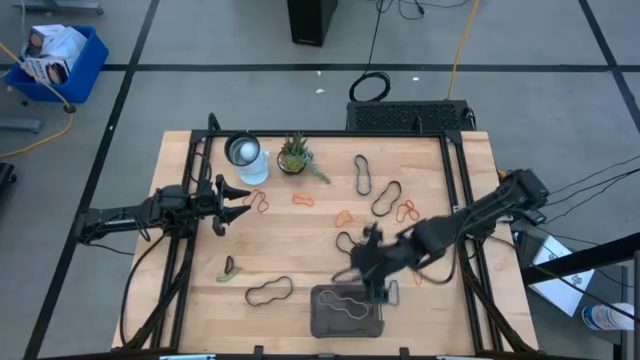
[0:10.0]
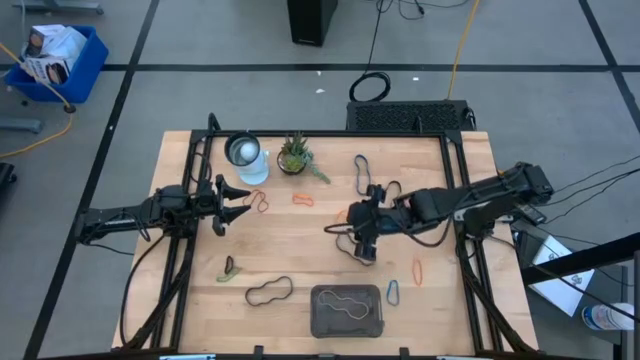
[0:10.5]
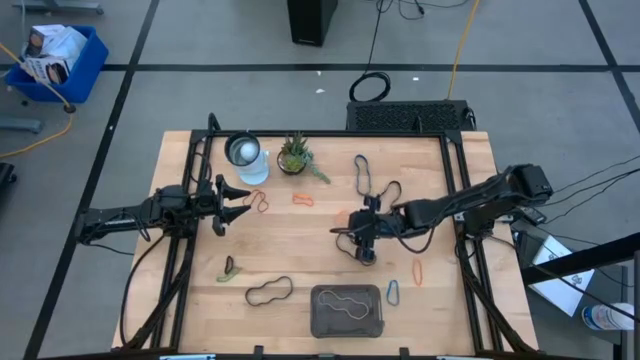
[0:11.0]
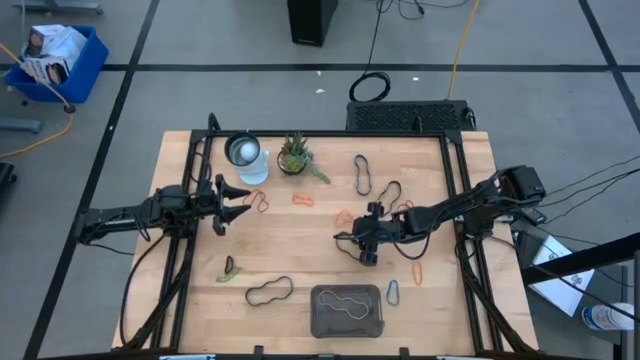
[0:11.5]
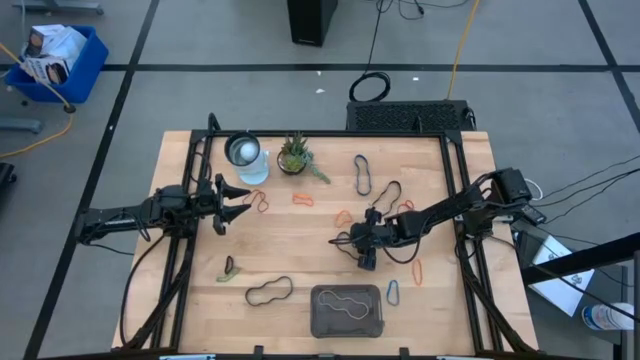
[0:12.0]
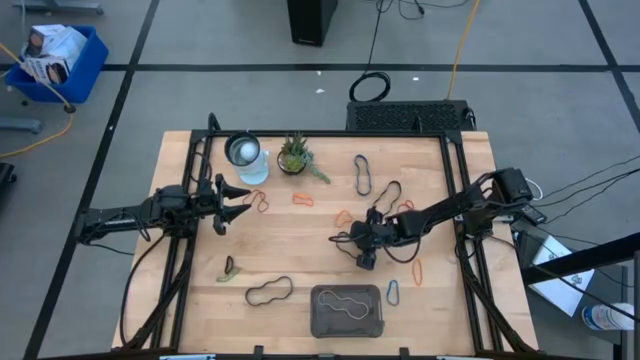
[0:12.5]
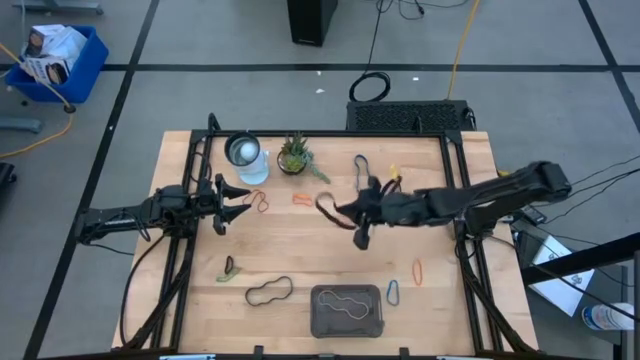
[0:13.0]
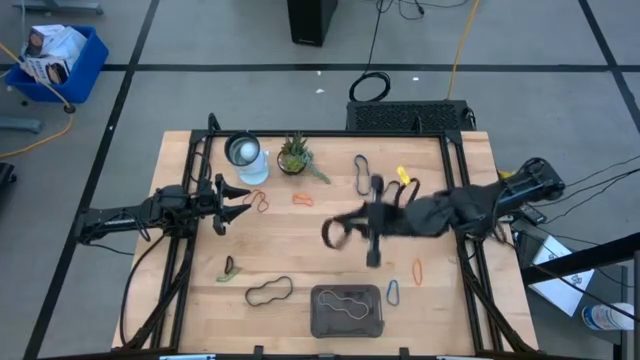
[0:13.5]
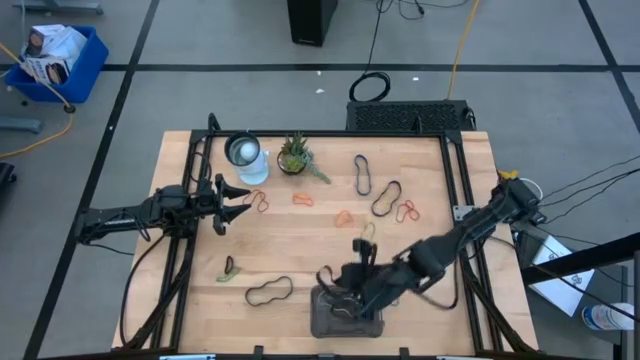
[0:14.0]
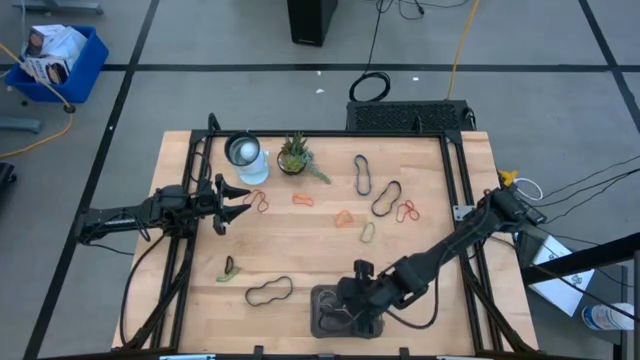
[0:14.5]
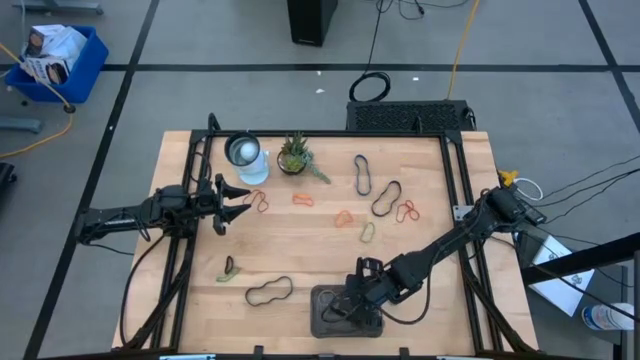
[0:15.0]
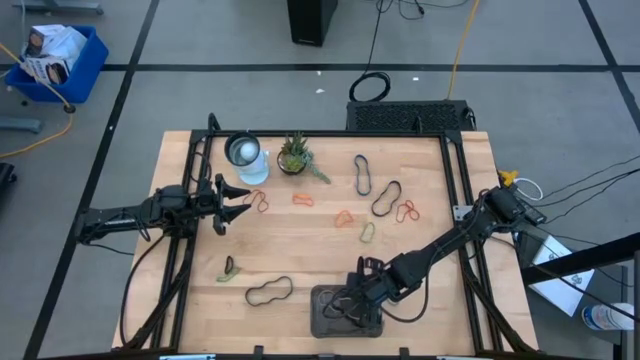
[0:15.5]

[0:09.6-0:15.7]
Task: Pick and place rubber bands into bin
Put the black rubber band into the black transparent bin

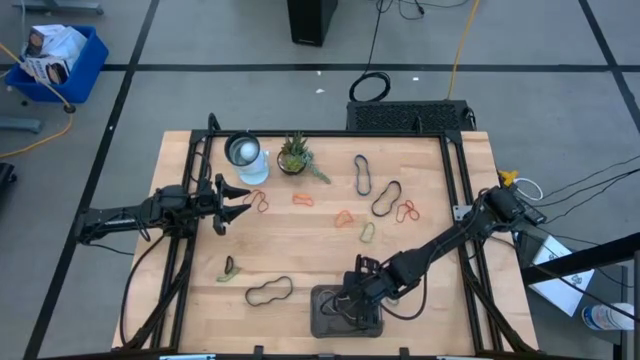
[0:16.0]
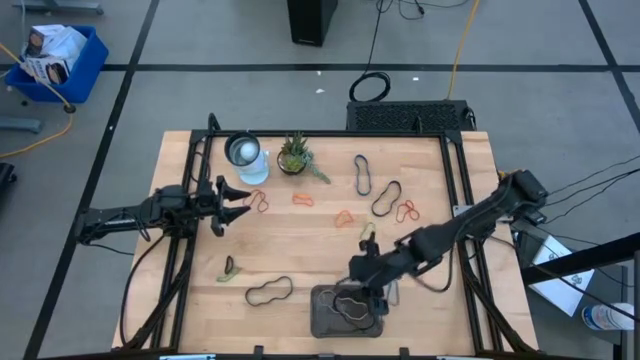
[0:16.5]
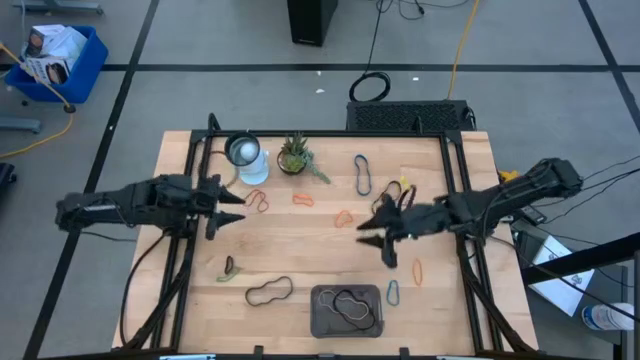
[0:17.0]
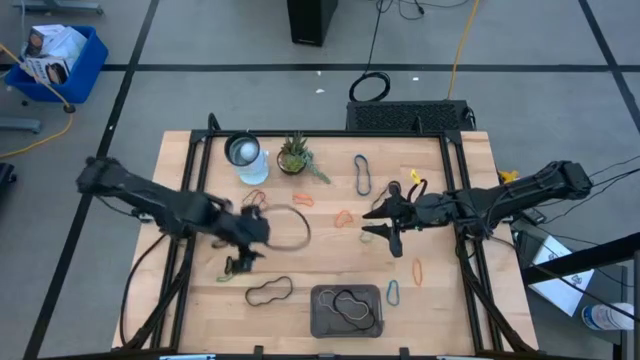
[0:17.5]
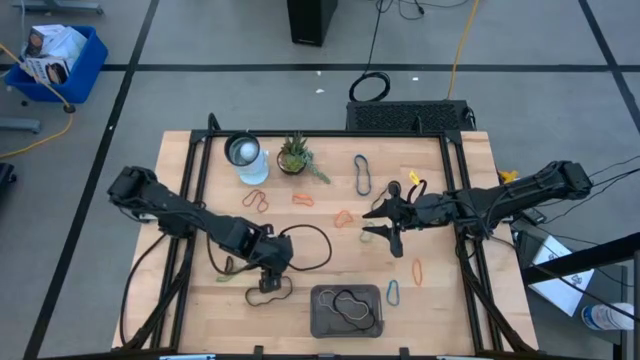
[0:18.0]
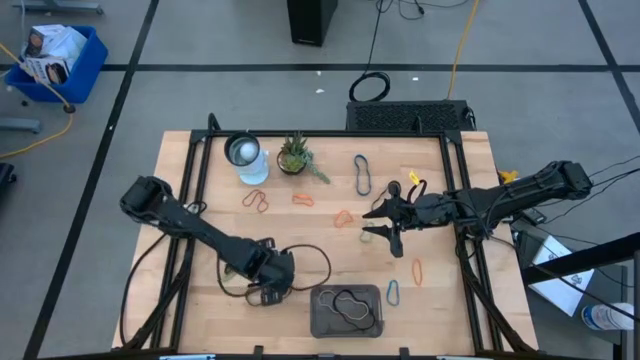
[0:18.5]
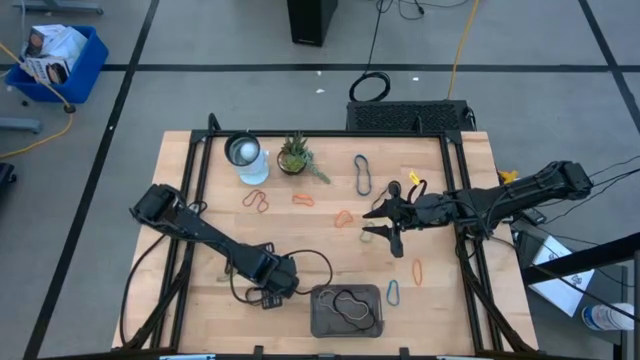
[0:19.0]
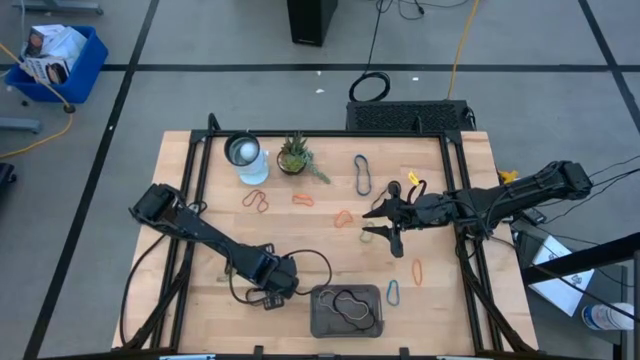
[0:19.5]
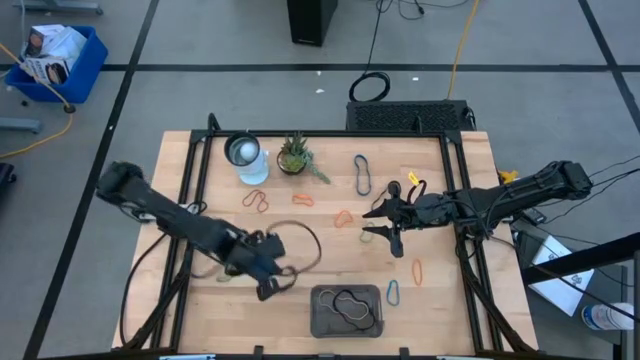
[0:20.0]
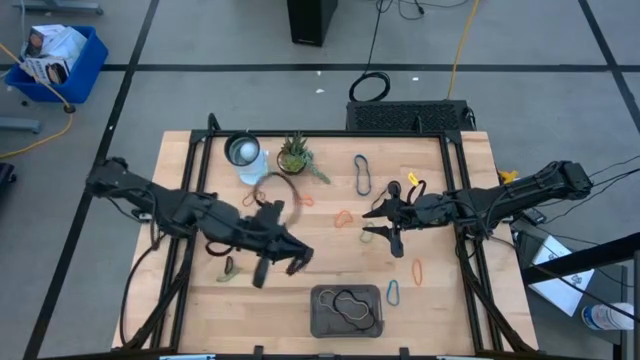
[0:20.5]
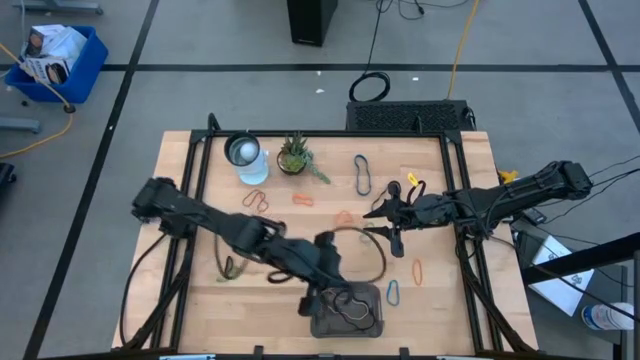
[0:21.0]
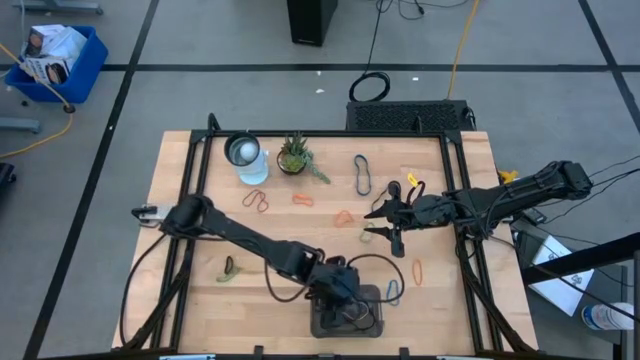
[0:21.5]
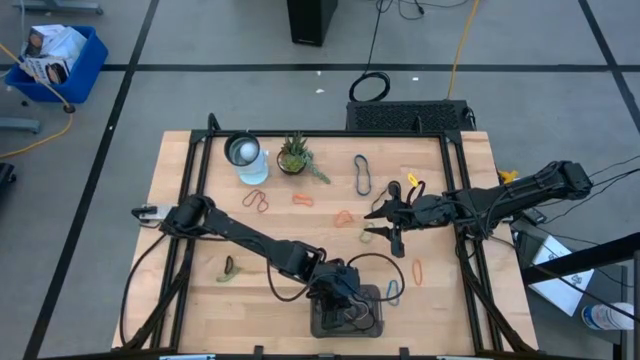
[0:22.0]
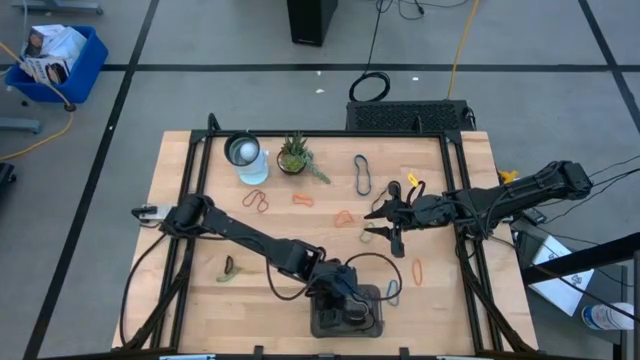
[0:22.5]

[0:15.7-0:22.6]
Put the black rubber band into the black transparent bin

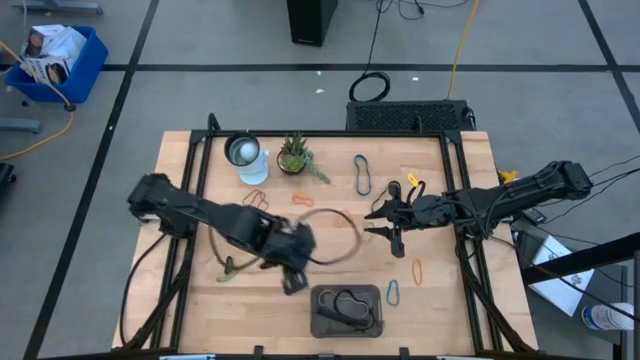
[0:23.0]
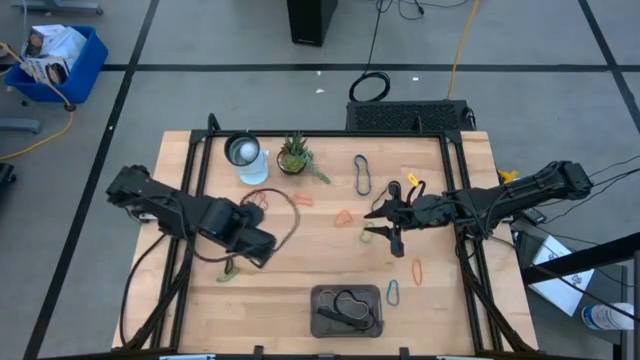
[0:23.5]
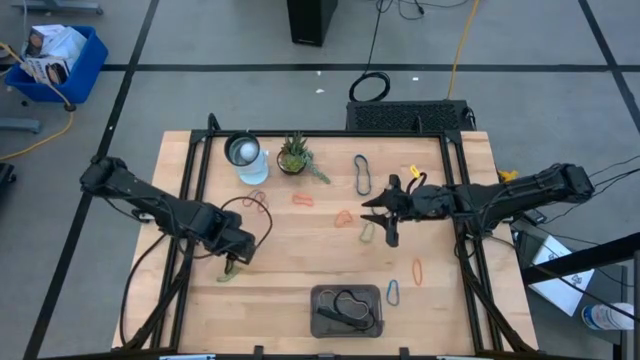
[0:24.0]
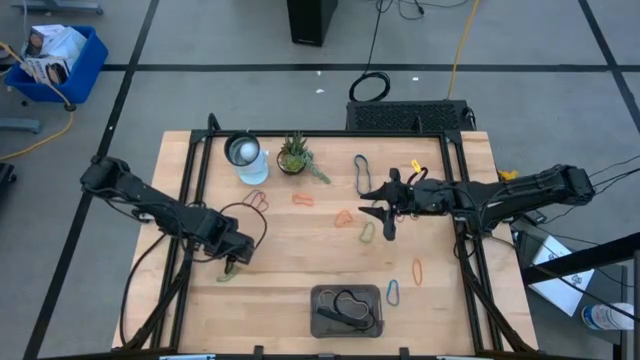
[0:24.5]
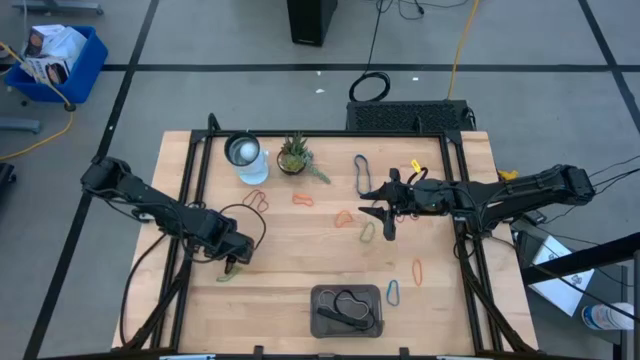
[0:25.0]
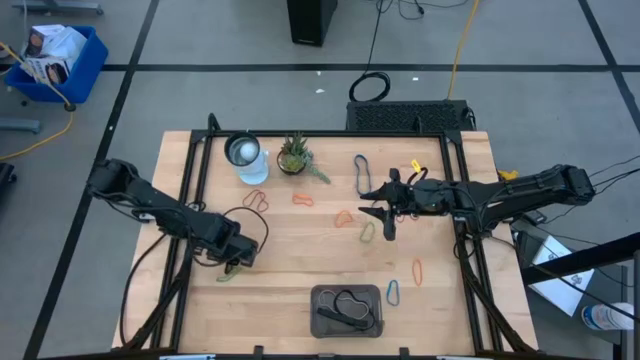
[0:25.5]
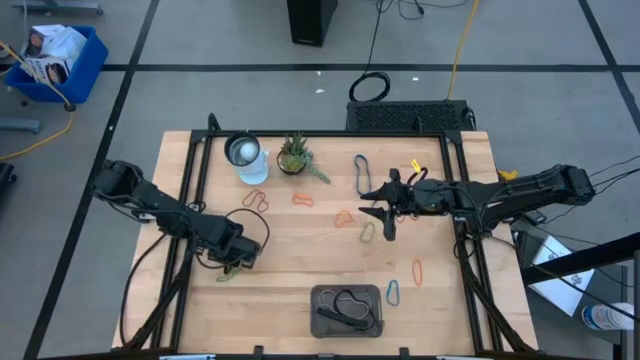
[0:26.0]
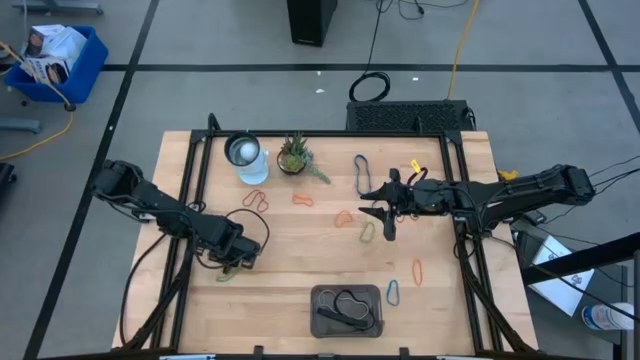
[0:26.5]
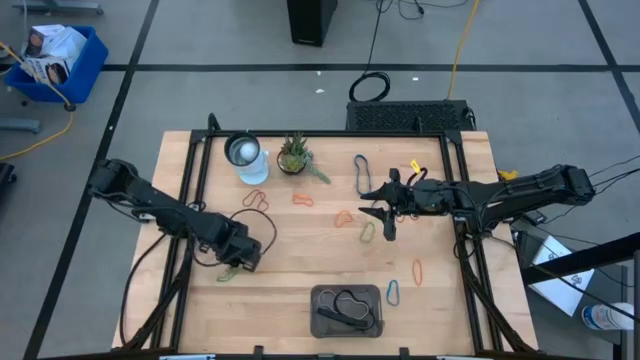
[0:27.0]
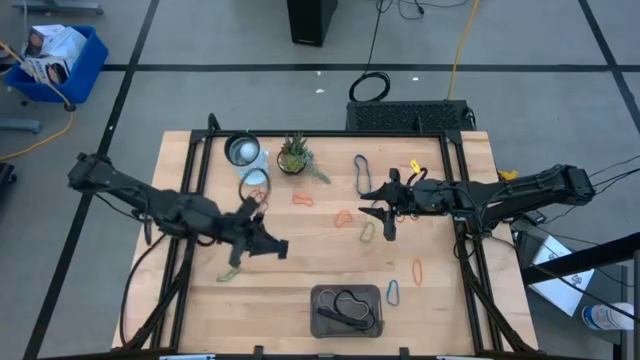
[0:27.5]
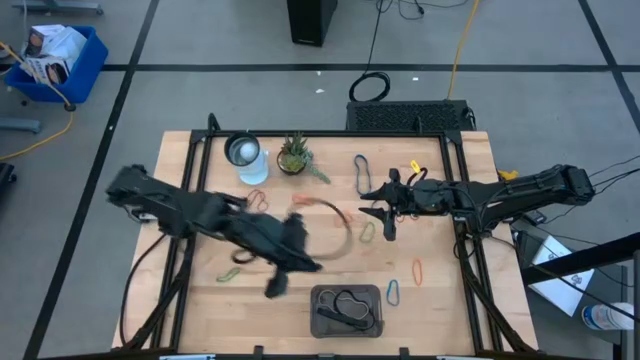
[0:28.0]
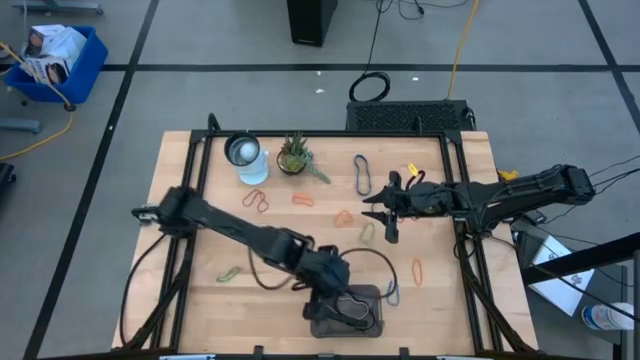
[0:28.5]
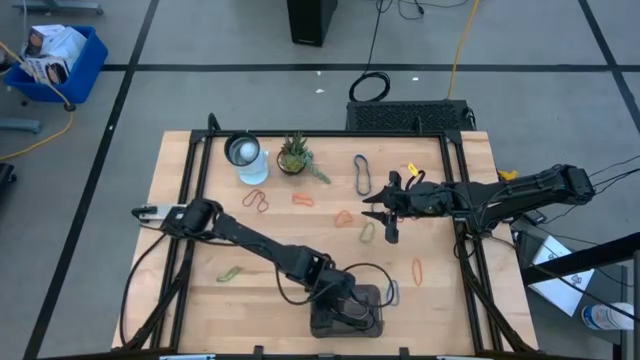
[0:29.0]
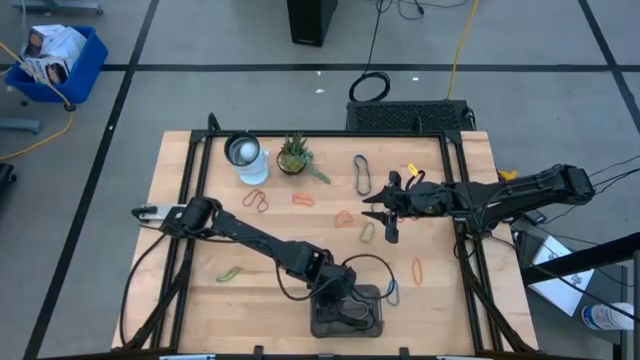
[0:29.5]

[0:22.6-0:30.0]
Put the black rubber band into the black transparent bin

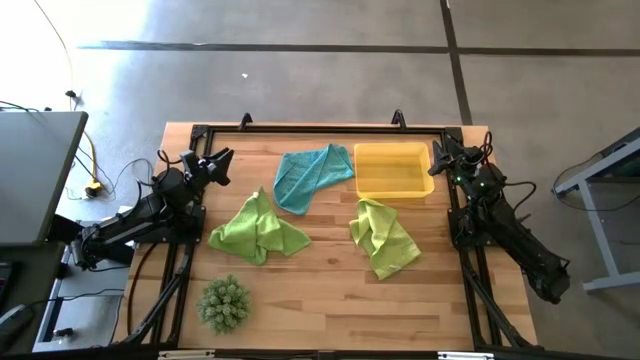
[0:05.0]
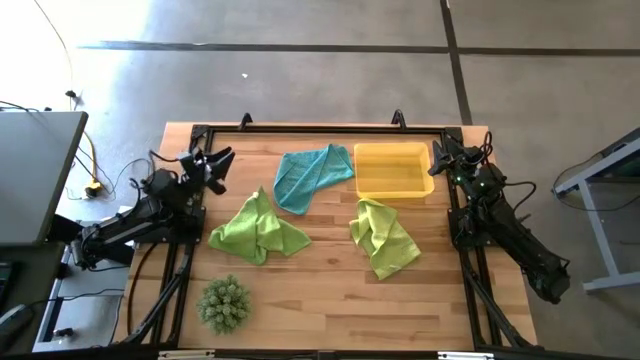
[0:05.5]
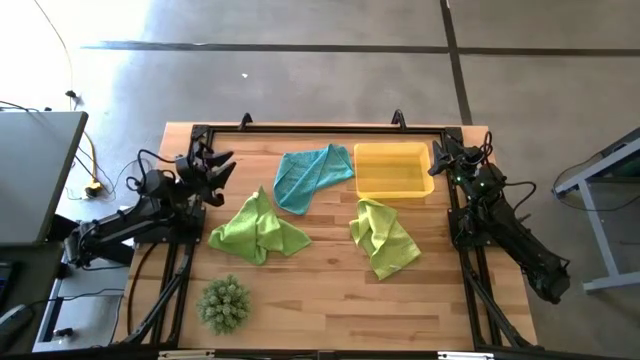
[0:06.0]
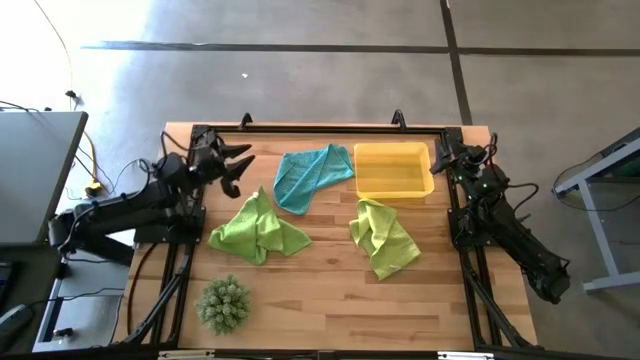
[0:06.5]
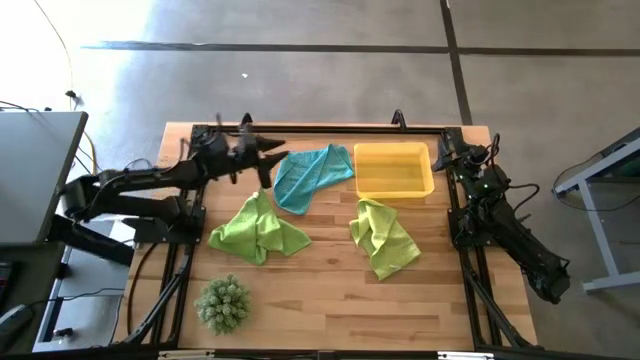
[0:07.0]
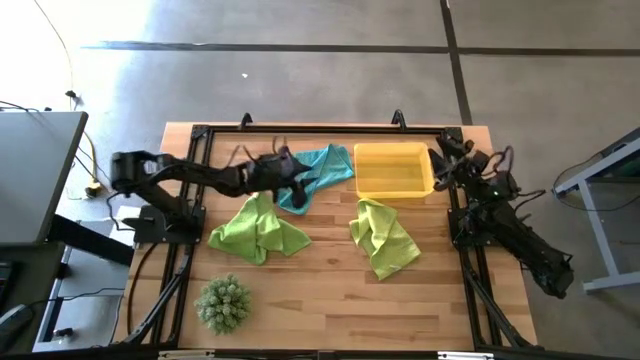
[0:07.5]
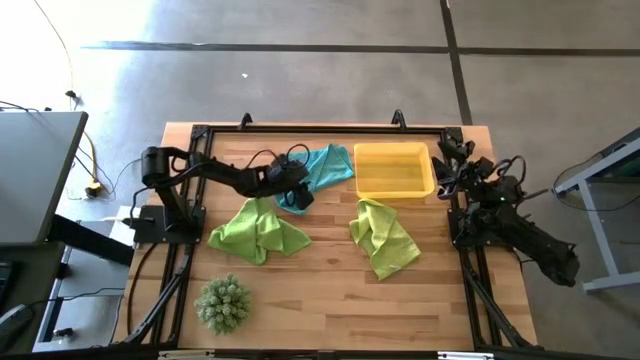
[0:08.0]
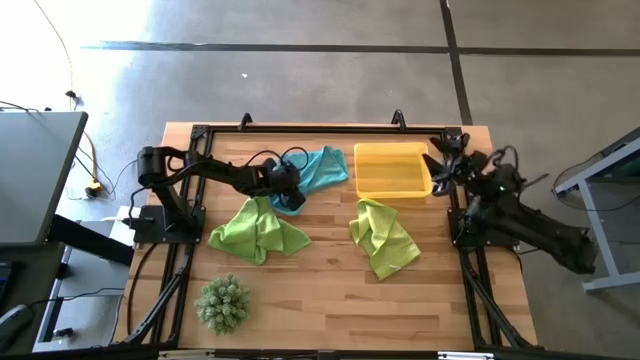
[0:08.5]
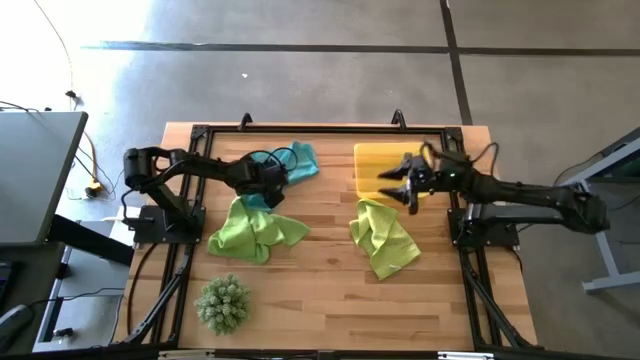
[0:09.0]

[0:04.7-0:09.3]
Task: Roll microfiber towels into tight, uniform cylinder then place into a basket
Prepare the table to roll the towel
